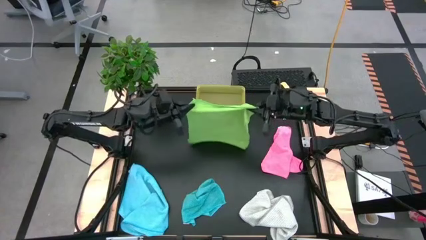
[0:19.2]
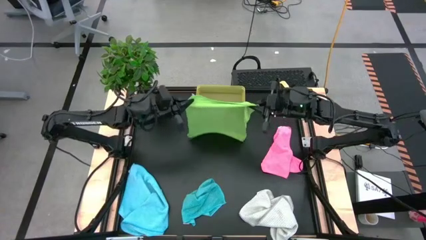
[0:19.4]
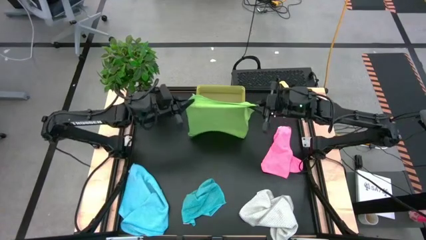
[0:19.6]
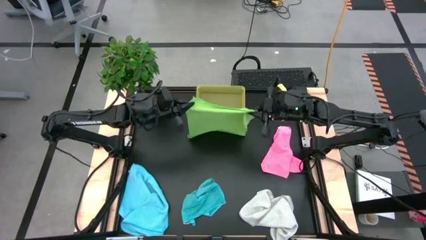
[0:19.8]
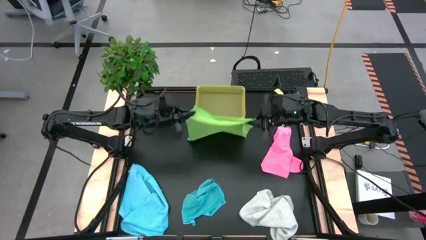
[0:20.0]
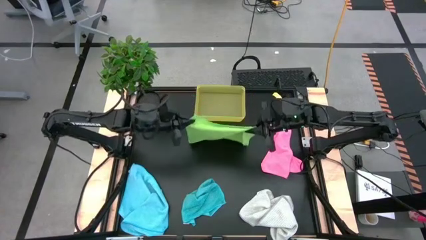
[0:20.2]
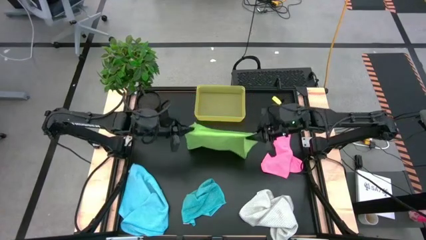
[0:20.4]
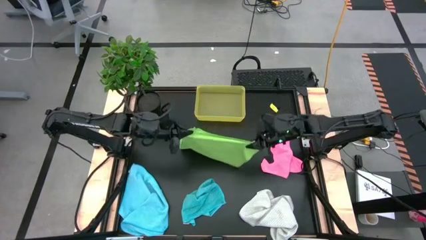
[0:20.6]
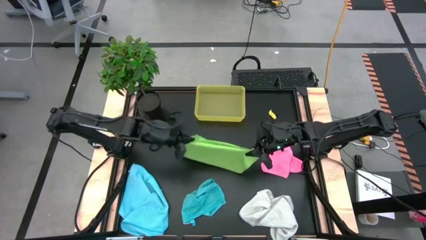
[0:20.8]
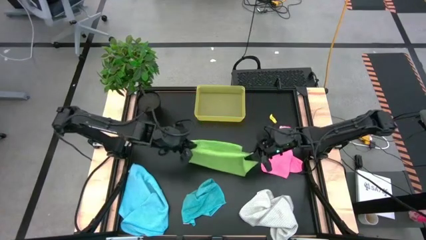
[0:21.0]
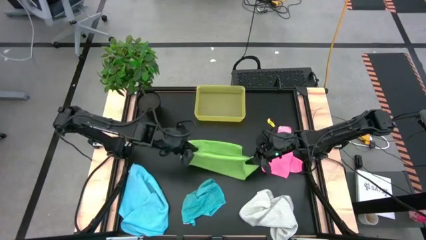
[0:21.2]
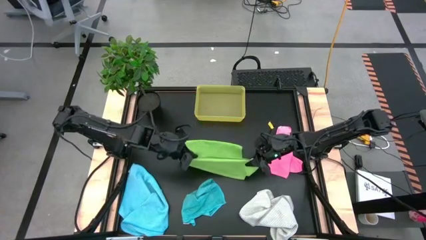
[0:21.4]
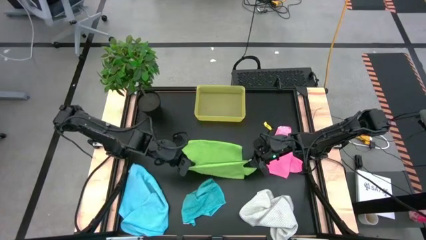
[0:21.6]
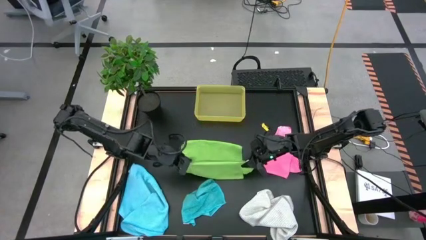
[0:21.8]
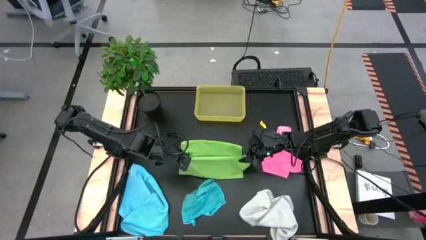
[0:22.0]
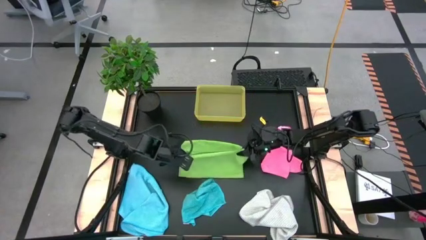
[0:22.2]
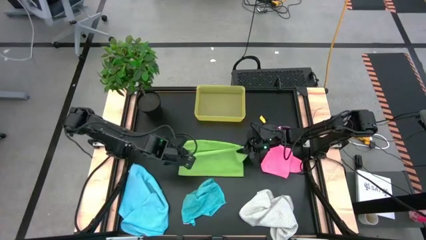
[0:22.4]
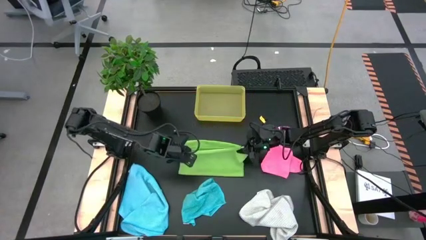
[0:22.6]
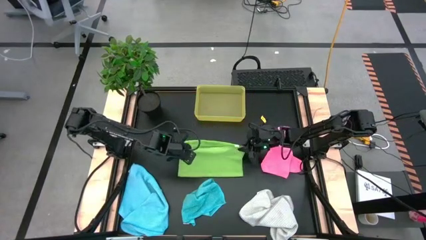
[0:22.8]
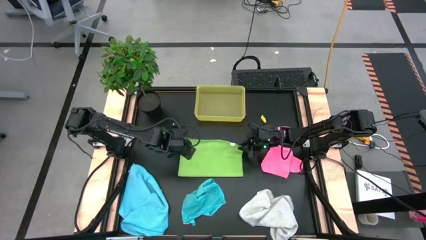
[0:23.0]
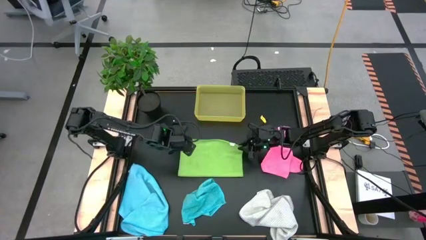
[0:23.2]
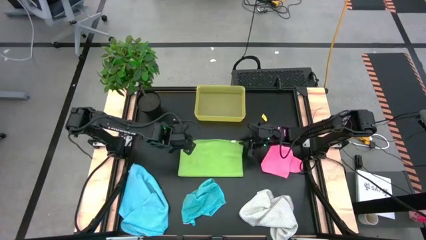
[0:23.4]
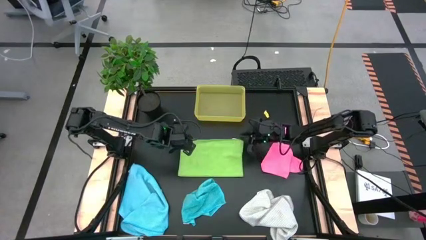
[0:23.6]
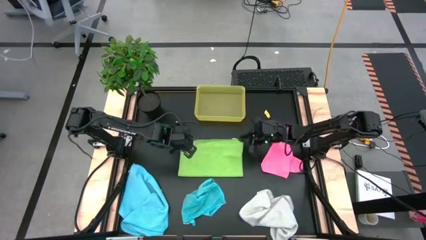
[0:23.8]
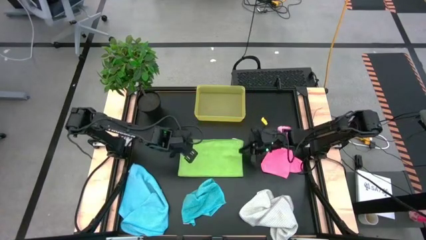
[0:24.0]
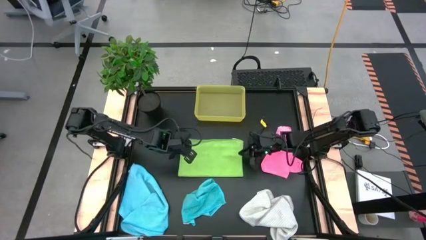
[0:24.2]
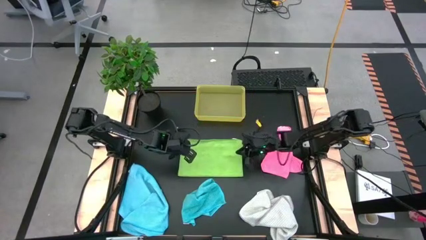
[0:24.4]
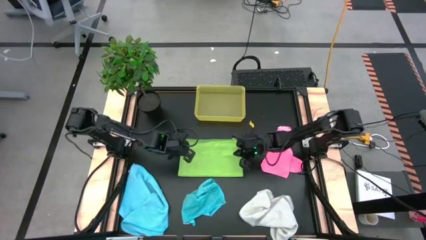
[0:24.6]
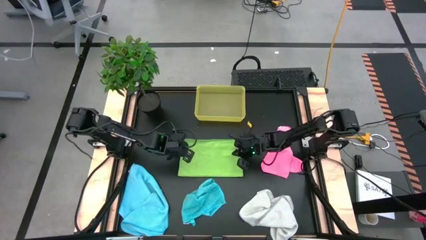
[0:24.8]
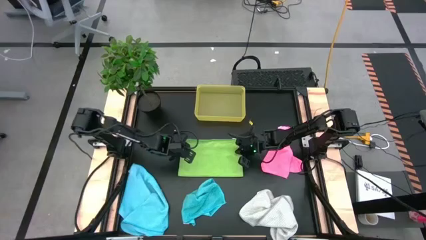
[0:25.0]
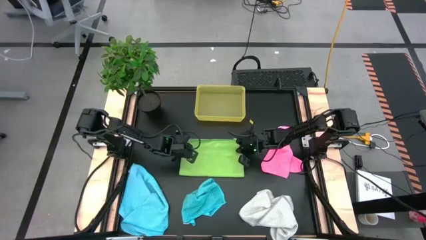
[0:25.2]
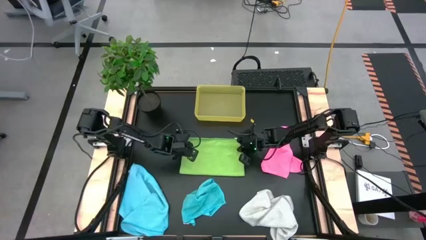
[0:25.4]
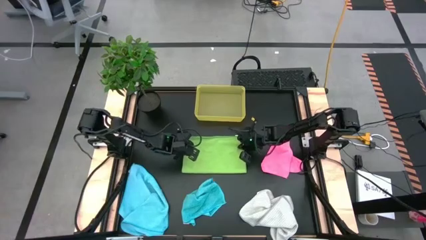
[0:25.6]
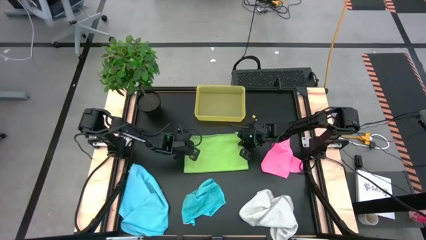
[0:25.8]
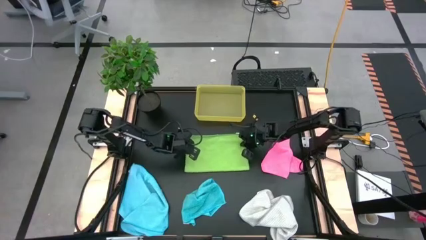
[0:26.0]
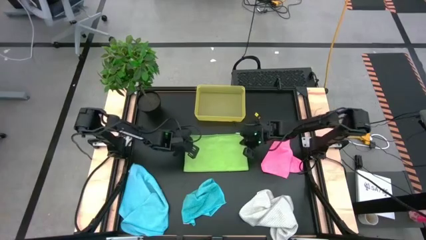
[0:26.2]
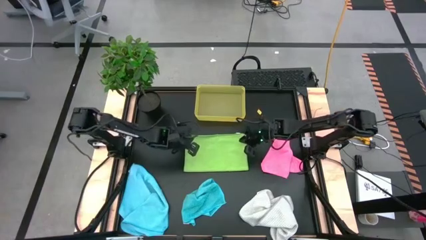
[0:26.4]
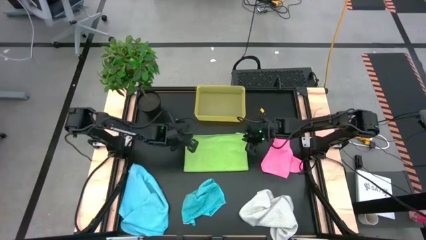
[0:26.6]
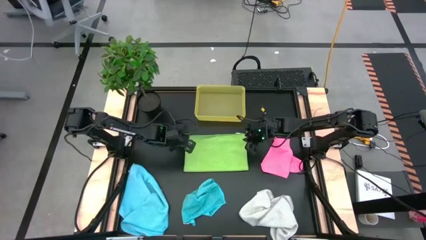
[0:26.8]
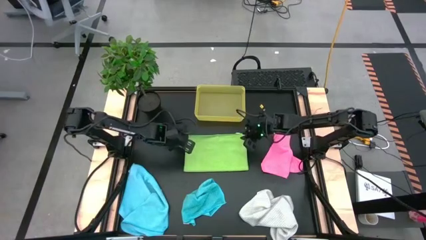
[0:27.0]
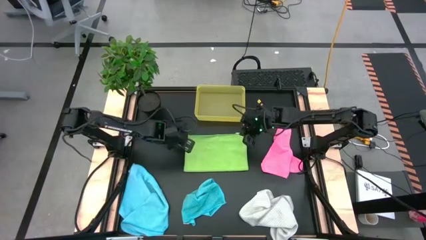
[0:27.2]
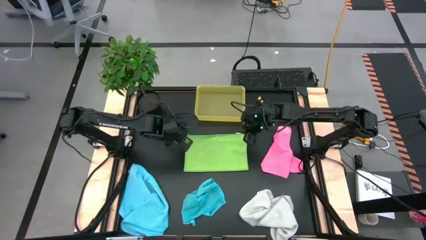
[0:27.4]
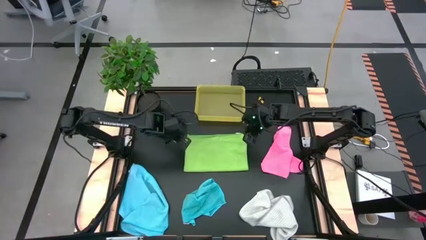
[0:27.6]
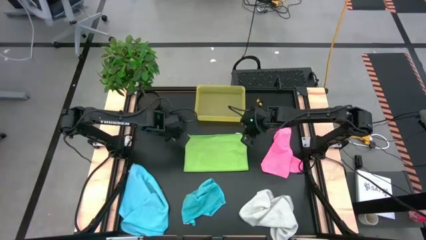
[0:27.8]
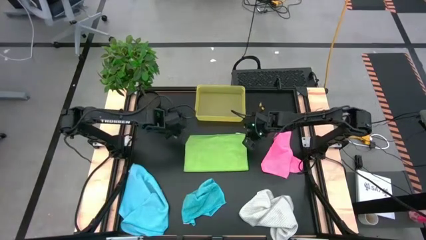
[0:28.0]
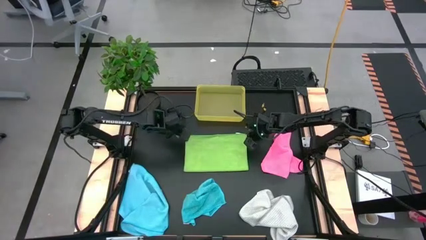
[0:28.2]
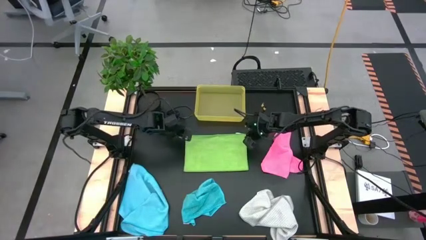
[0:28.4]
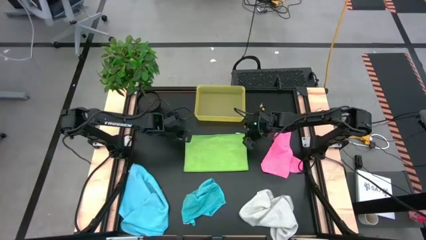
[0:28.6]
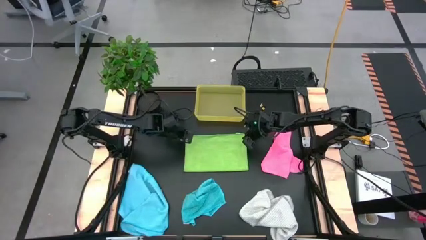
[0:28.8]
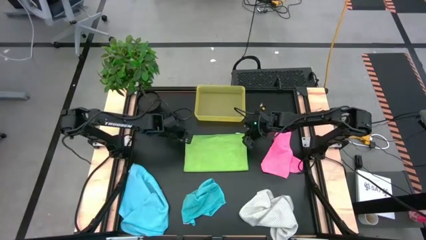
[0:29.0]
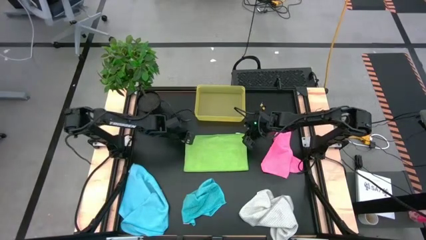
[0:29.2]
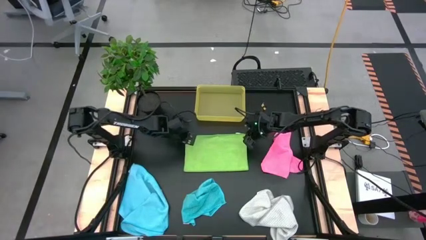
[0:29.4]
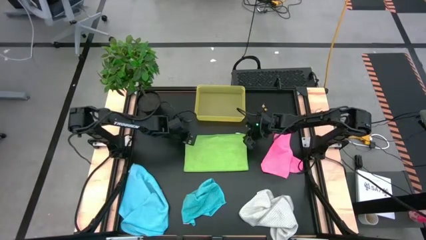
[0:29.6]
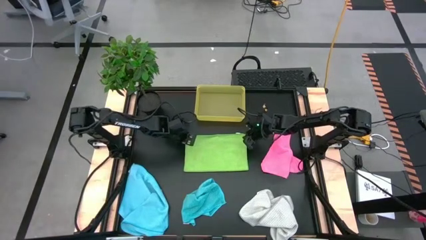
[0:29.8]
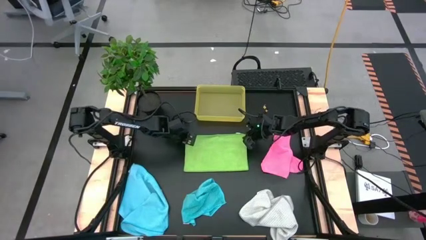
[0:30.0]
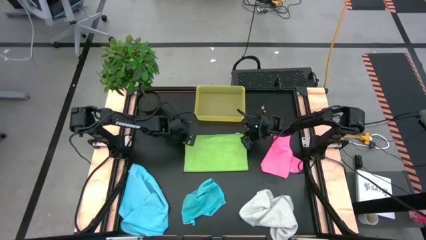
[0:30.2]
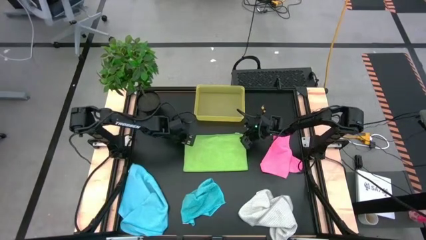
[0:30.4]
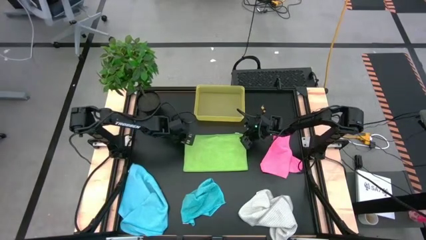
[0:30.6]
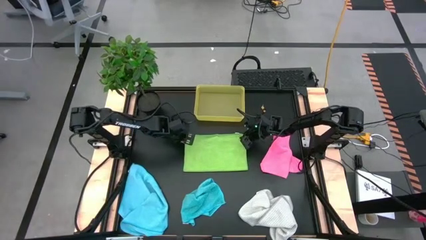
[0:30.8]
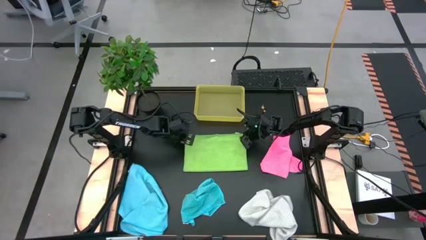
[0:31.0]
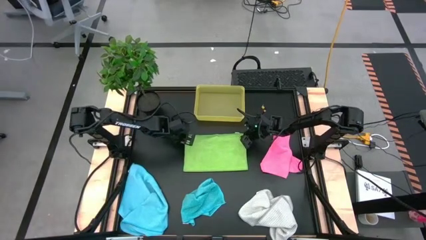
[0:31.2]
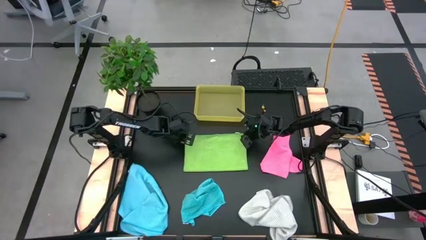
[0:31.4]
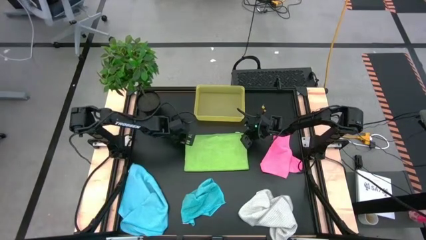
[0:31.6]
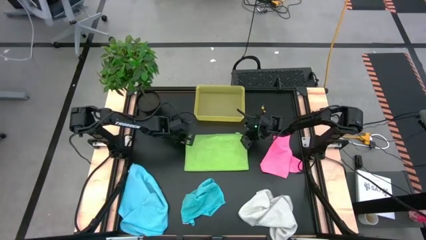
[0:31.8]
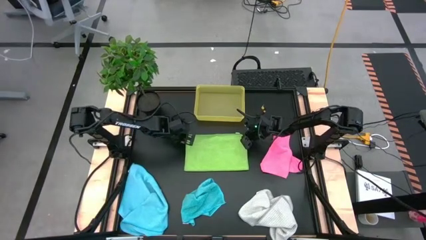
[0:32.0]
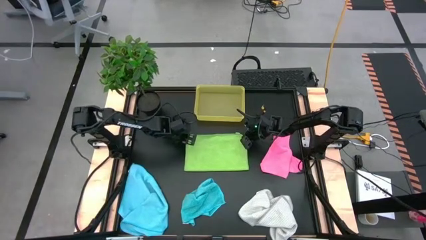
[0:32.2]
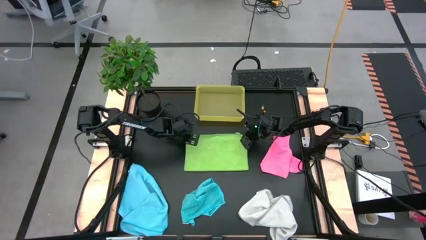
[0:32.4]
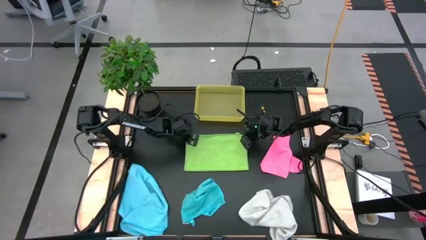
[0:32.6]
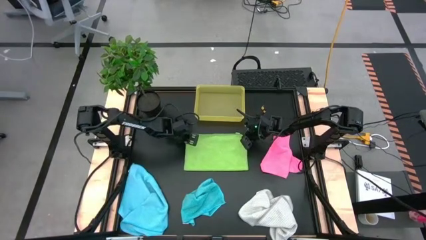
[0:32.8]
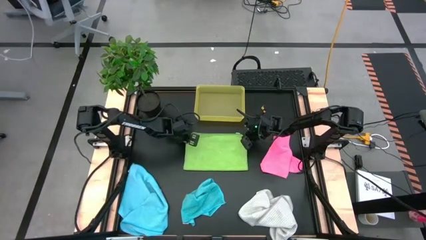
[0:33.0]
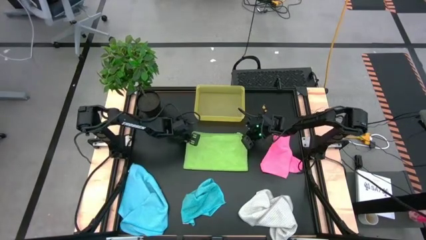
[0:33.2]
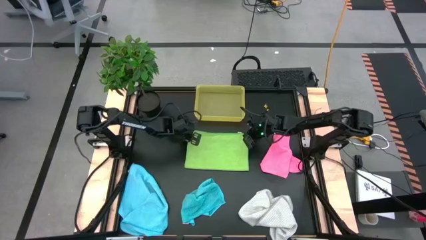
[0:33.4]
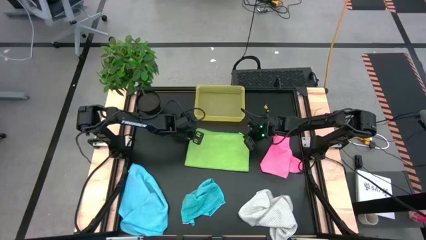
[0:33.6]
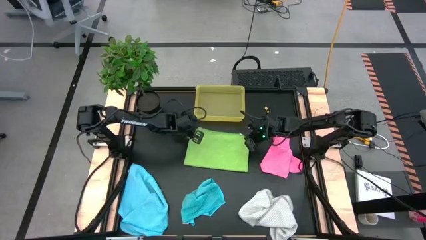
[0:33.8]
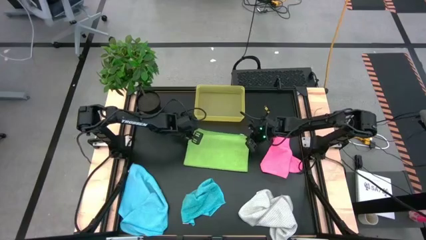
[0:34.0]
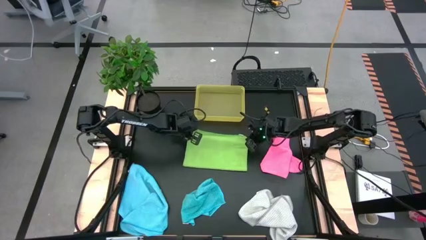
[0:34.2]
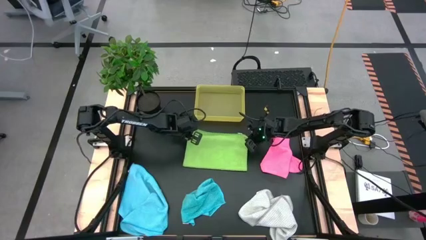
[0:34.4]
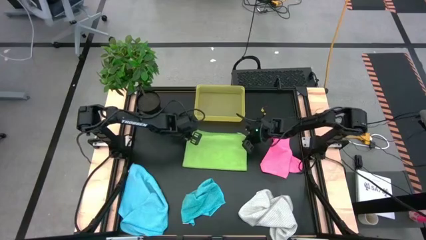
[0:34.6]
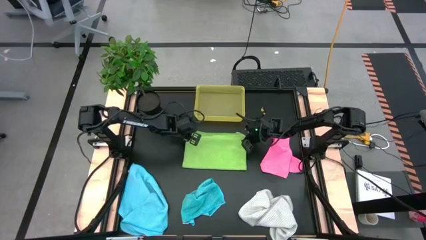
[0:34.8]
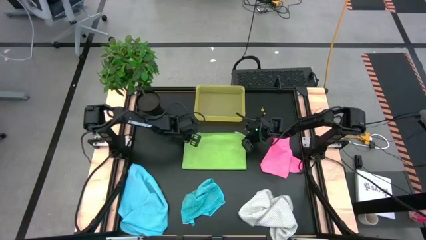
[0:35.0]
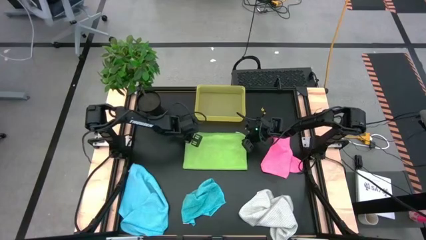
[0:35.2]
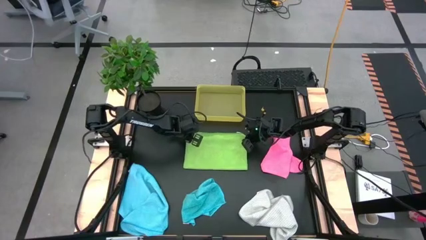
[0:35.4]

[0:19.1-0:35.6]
Task: Fold microfiber towels
Fold the green microfiber cloth
